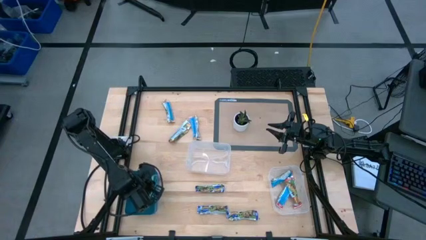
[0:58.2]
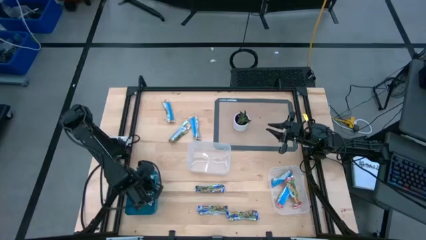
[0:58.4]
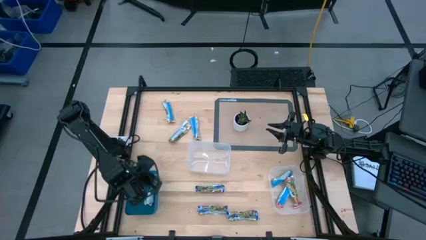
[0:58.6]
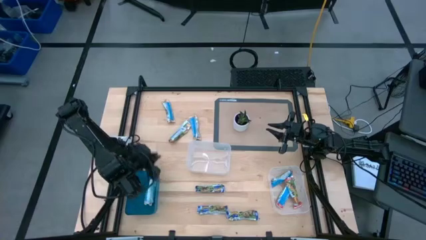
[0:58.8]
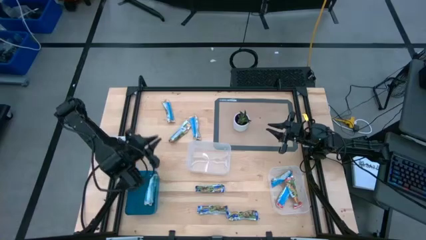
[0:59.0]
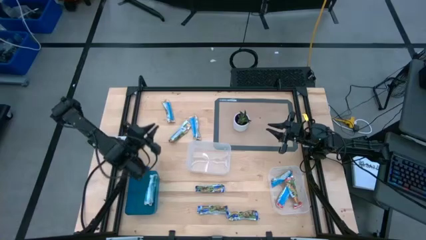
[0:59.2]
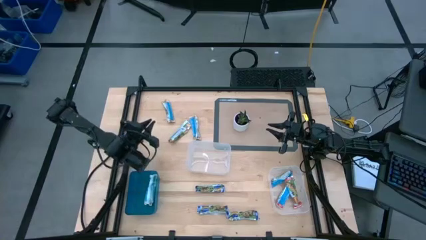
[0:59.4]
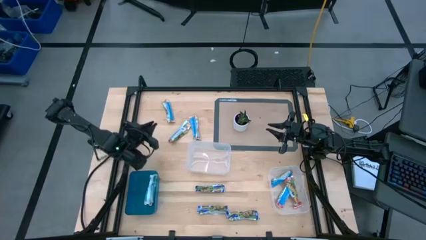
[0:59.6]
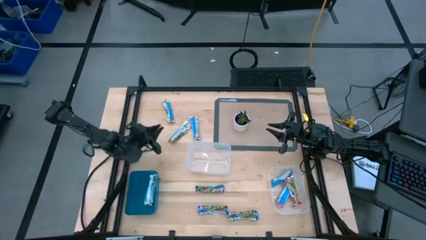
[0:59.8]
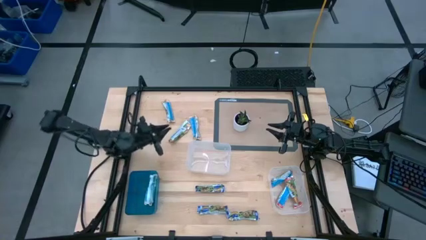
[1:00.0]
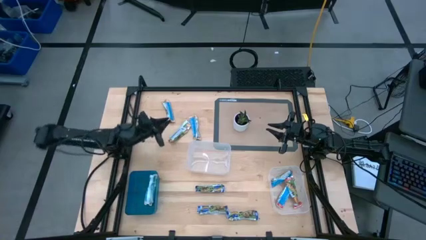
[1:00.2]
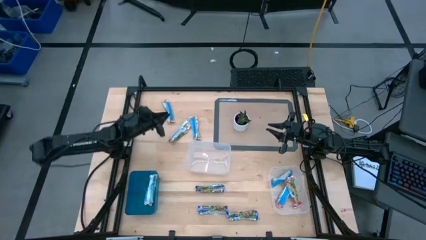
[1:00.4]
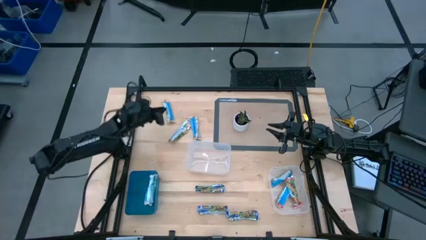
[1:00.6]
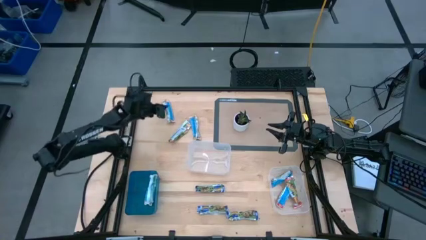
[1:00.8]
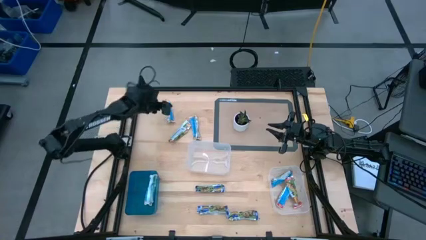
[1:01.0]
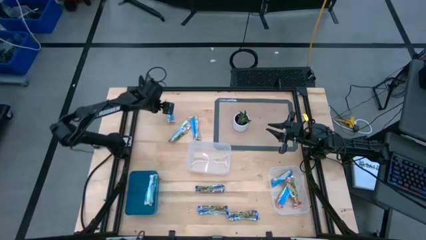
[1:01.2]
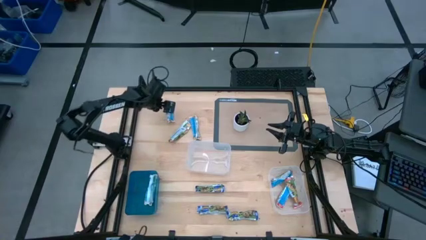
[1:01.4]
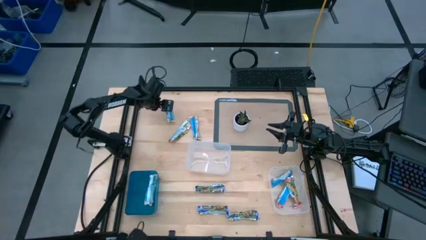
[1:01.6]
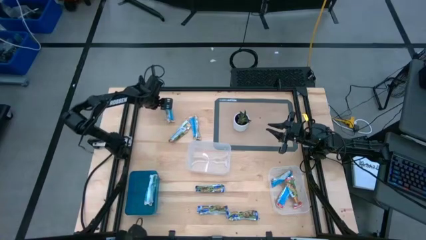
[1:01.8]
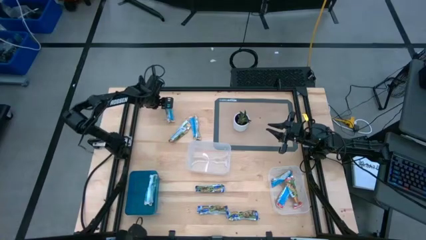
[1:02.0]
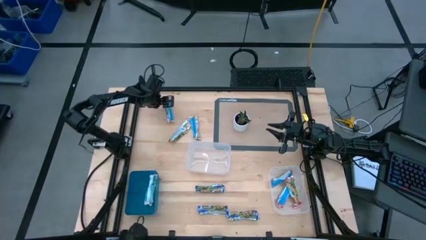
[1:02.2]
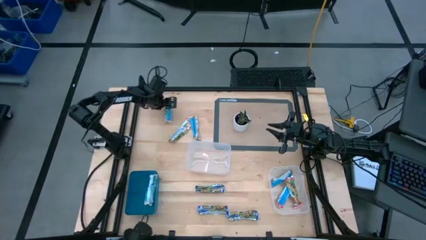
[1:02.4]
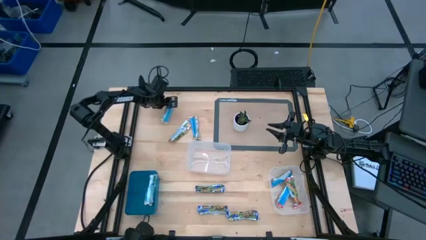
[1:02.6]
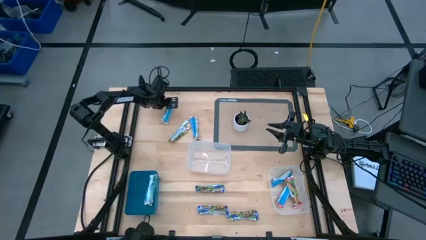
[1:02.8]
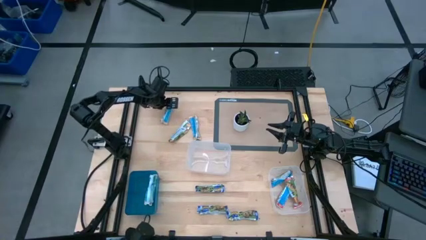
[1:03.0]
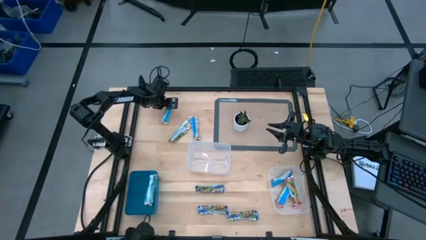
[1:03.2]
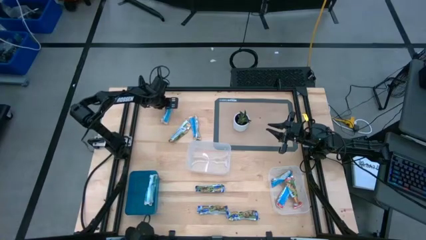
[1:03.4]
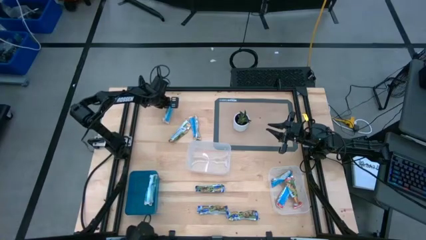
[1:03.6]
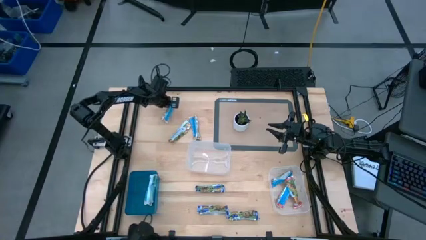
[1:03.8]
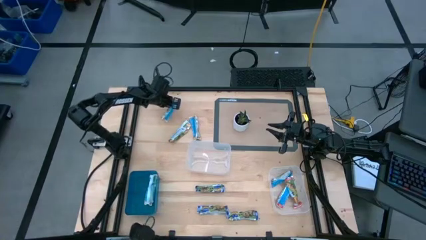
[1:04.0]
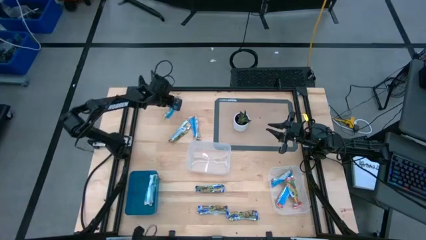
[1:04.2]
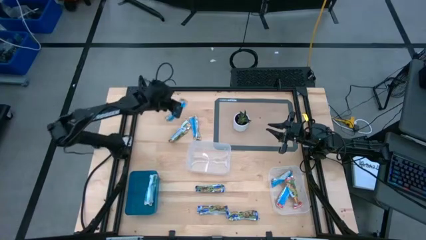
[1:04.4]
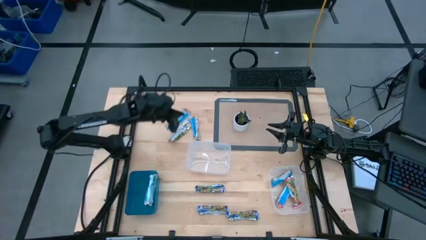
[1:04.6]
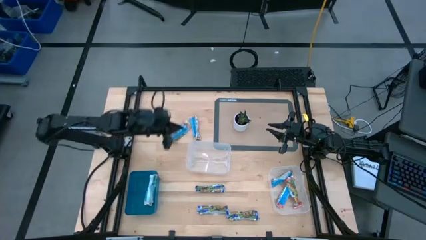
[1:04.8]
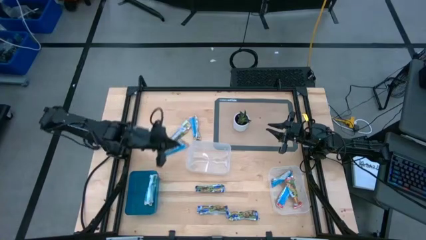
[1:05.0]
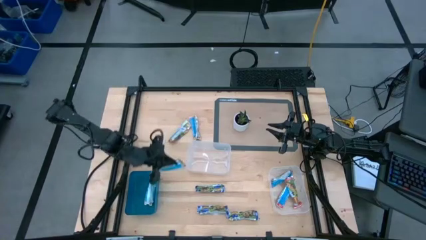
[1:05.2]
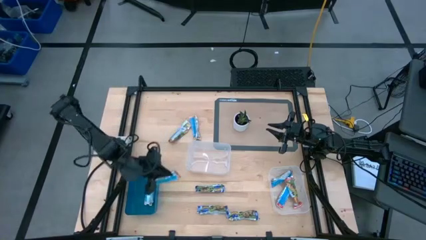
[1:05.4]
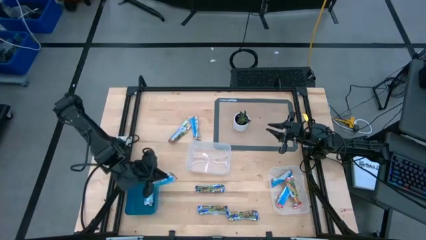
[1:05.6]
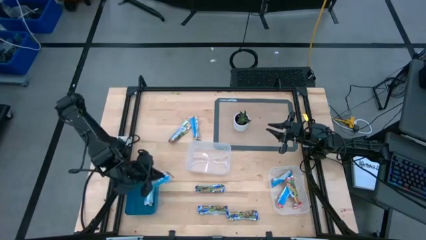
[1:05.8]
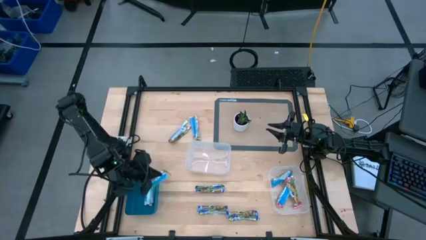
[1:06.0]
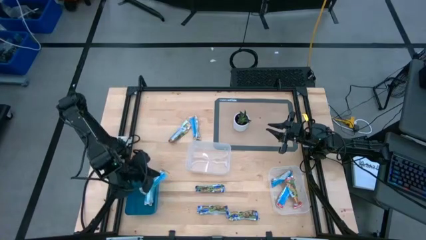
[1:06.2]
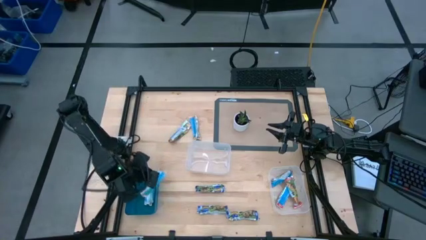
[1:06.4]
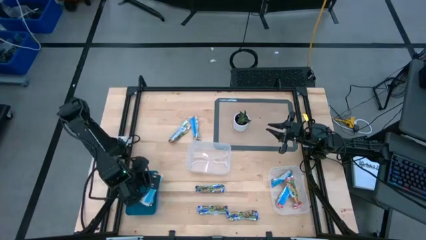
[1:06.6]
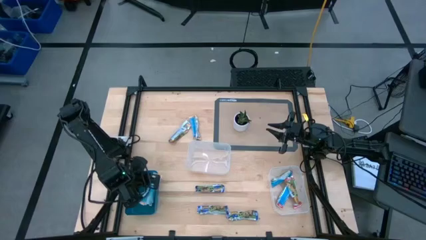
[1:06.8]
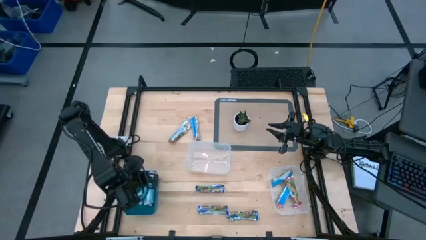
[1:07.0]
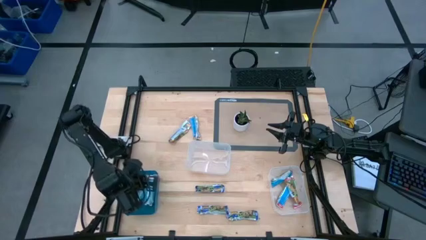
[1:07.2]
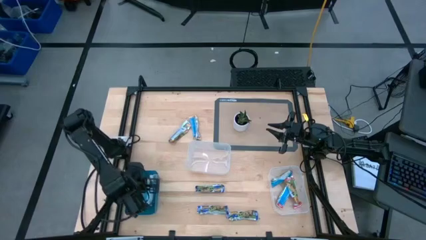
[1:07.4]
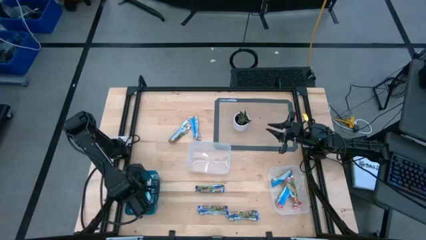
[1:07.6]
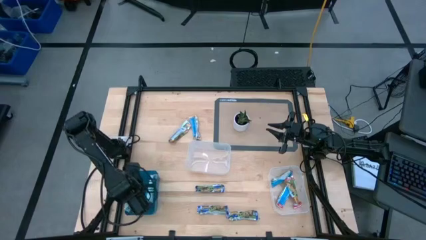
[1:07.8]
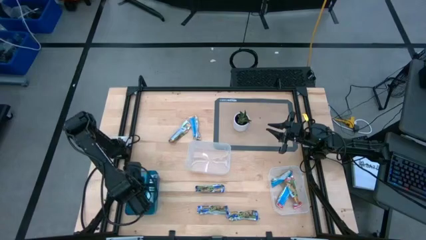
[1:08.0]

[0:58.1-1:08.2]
Task: Pick and place Granola Bars by type
Put the orange granola bar into the blue bin

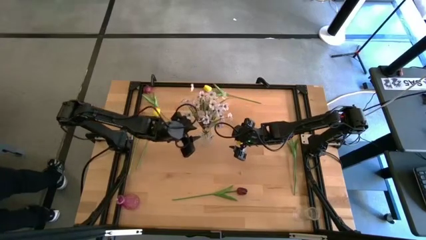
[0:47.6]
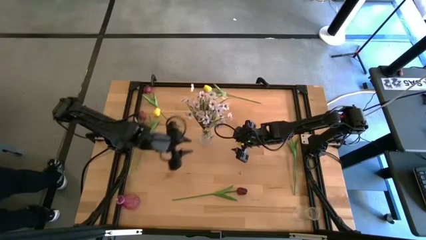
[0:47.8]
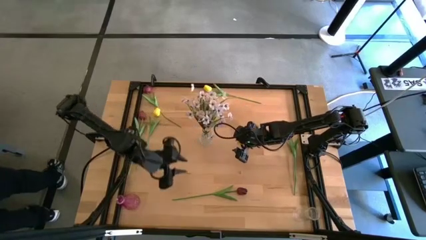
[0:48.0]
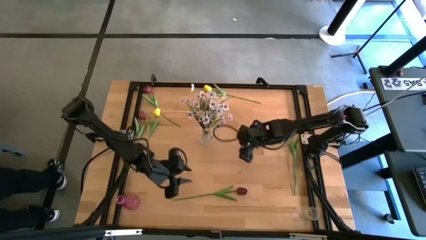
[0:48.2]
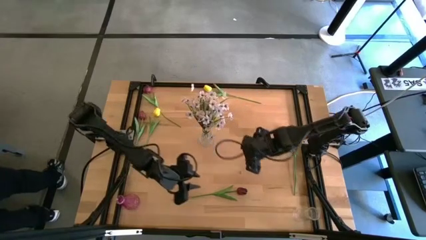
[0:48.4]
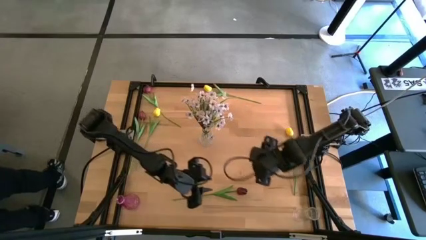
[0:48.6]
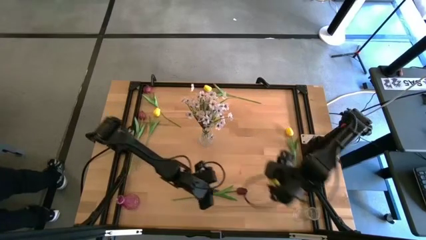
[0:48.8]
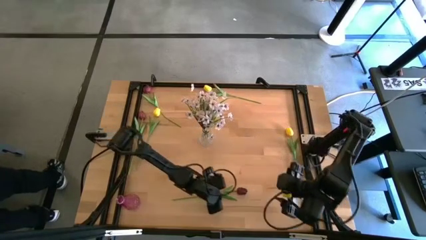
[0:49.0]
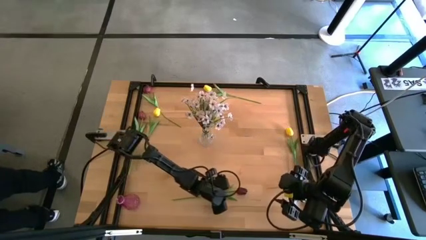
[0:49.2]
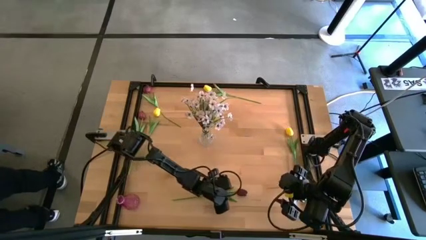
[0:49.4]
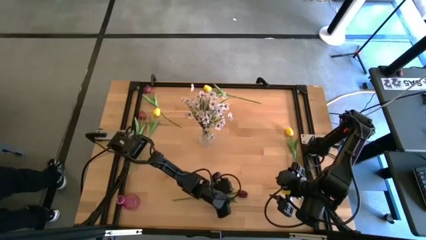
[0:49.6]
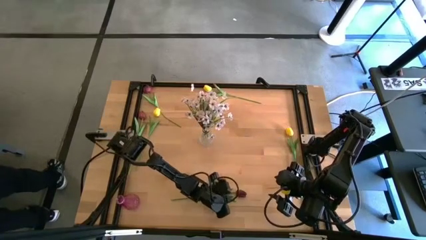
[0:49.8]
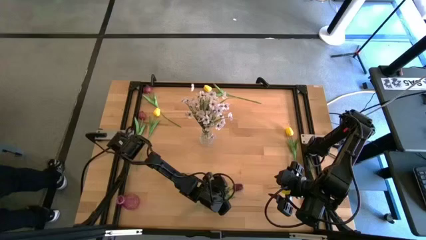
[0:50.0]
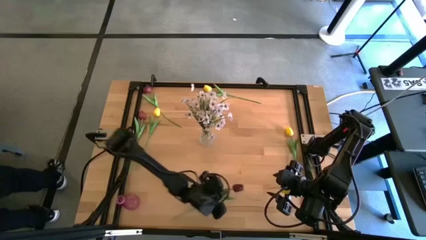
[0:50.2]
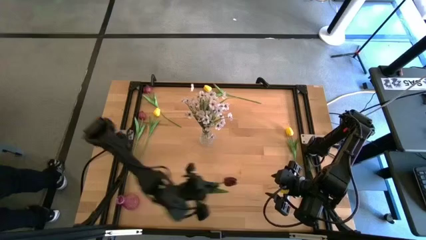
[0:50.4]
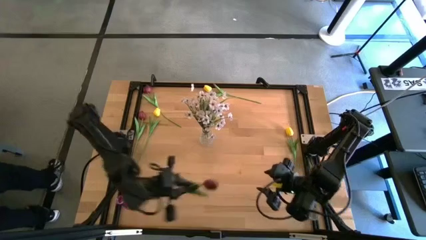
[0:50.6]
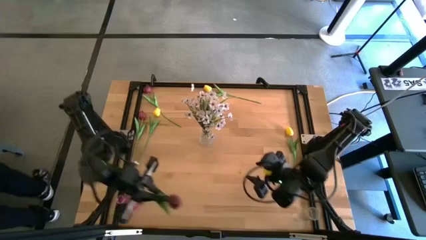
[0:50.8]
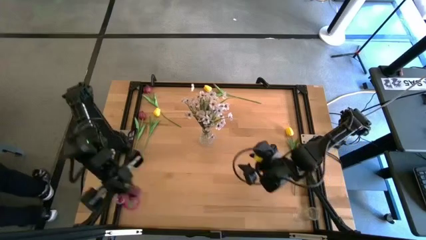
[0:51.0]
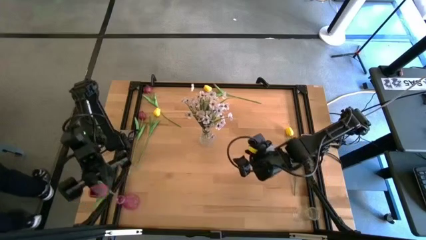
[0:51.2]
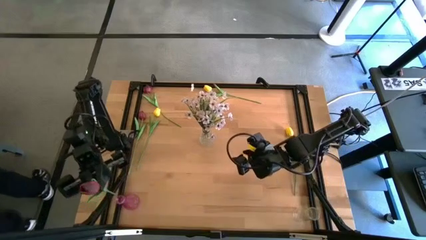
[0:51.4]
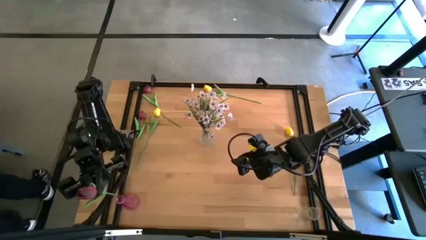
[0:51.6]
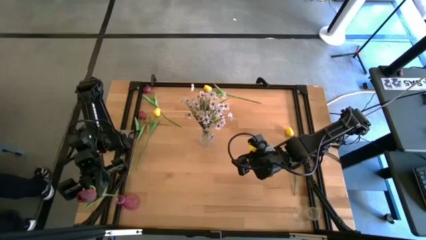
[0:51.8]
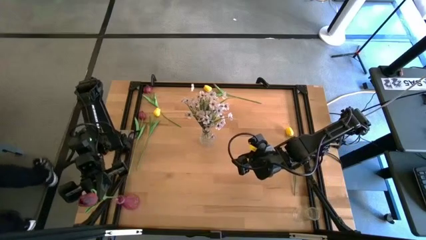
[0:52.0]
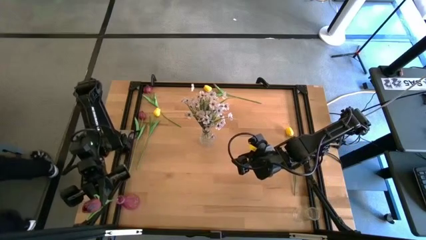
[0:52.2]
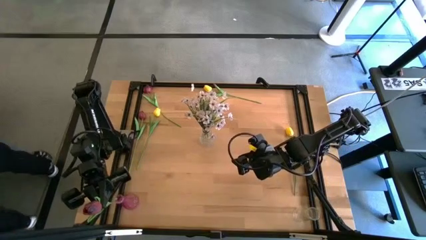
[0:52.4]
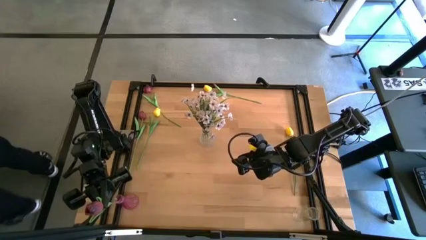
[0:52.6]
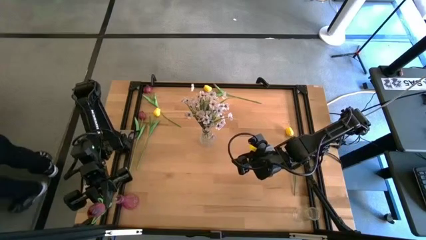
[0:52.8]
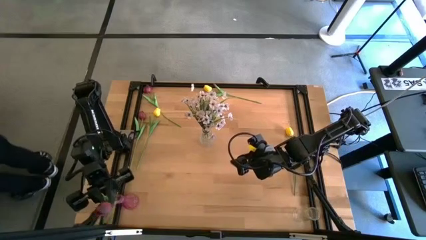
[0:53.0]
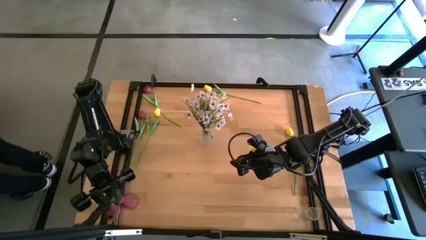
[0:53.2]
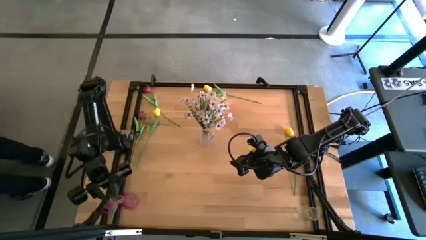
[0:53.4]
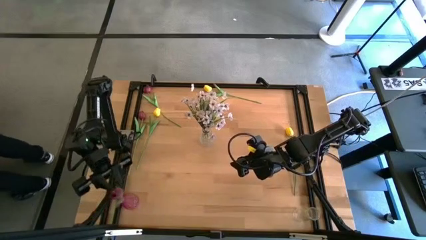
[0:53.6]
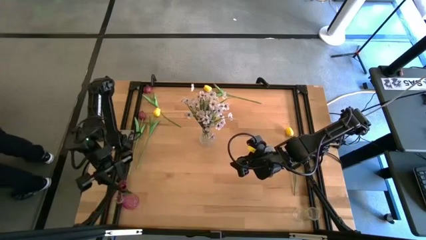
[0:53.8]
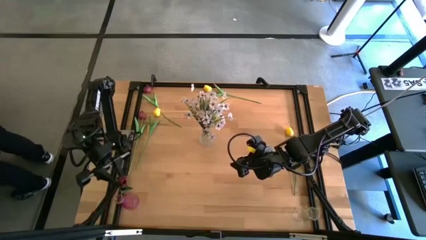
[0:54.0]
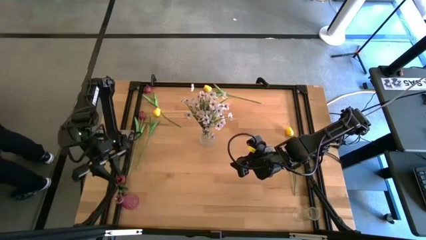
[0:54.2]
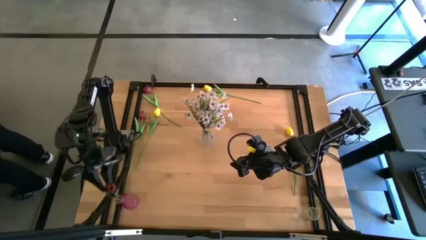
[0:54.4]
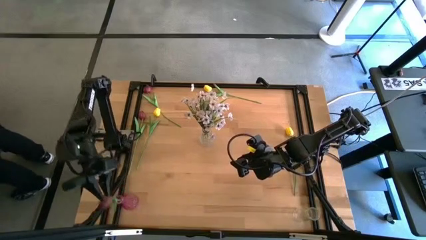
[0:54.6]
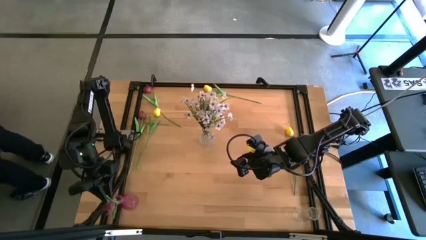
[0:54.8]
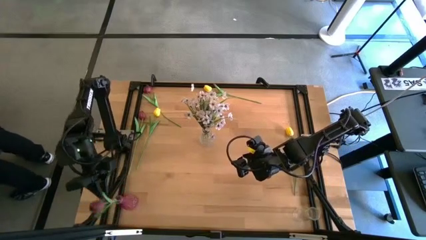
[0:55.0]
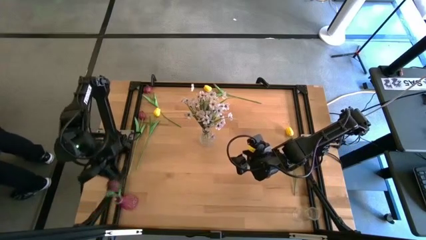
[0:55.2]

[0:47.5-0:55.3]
Task: Sort flowers into vase by color
Put the bottom red tulip into the transparent pink vase
